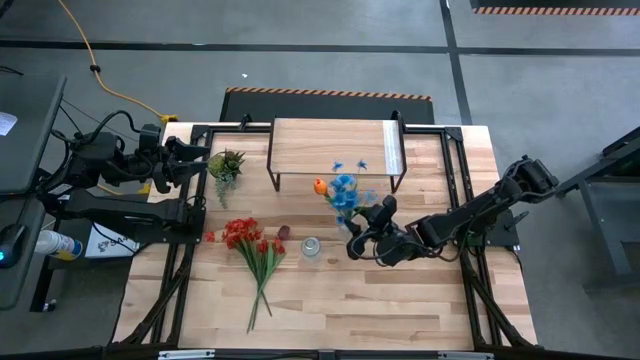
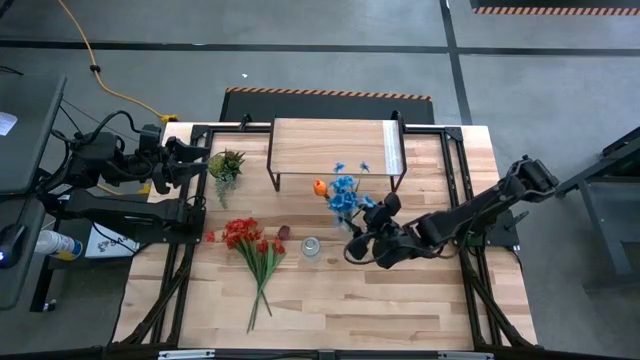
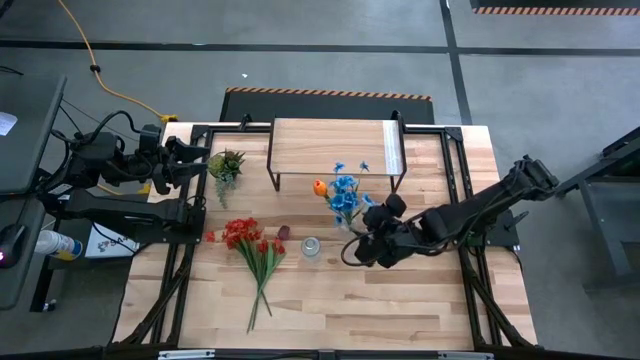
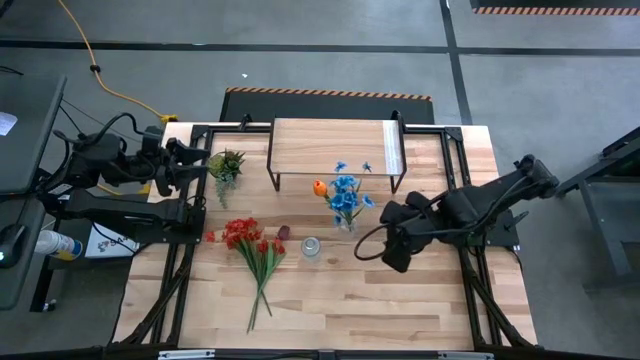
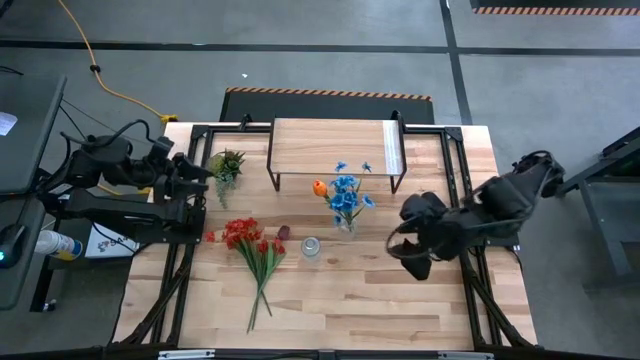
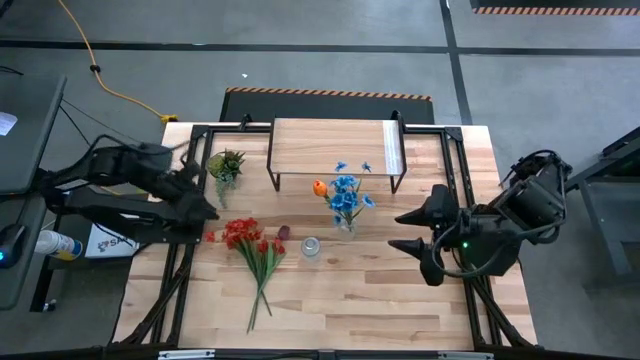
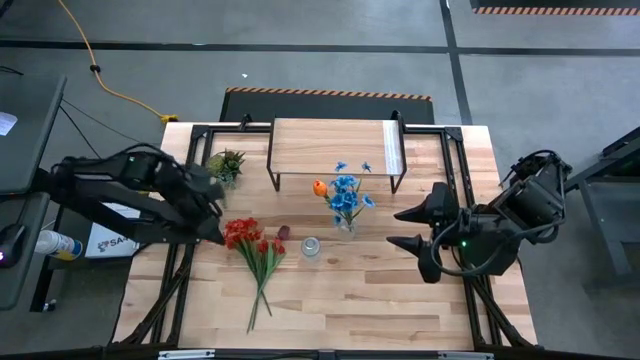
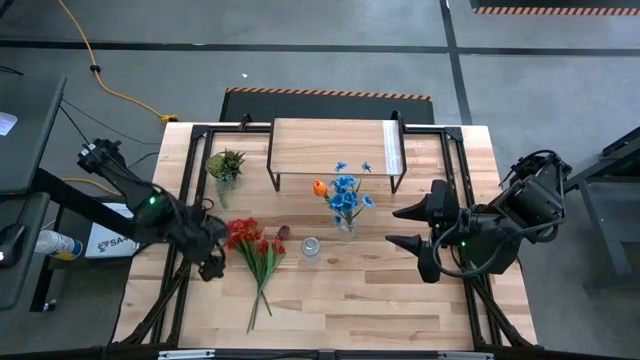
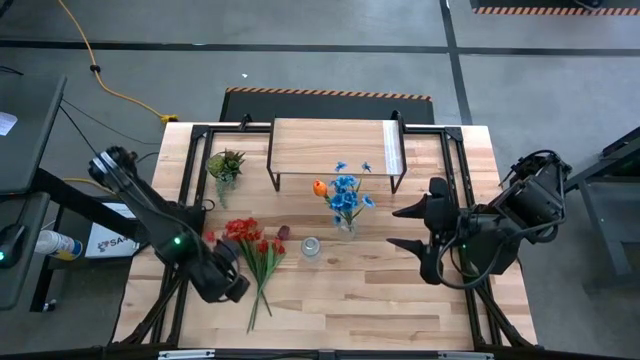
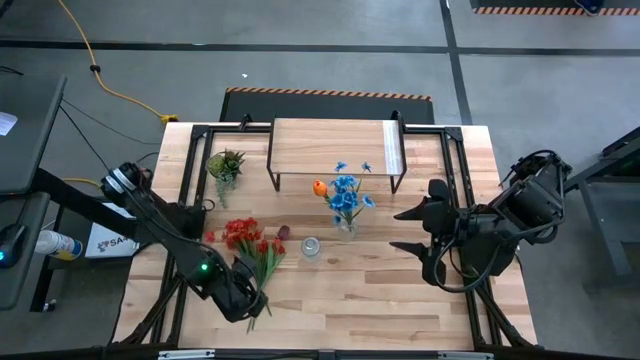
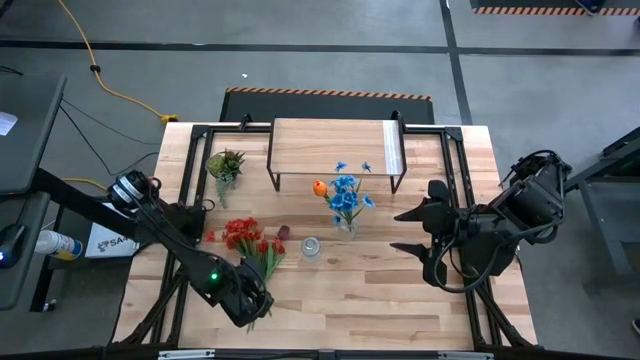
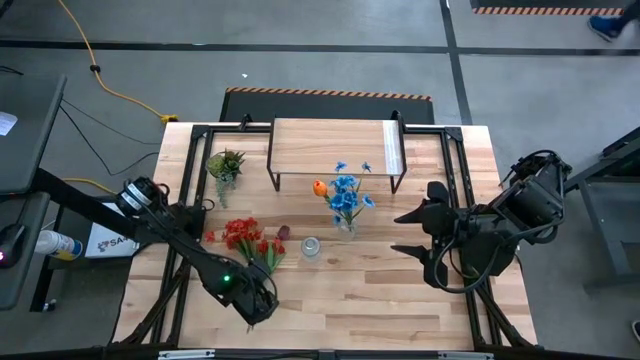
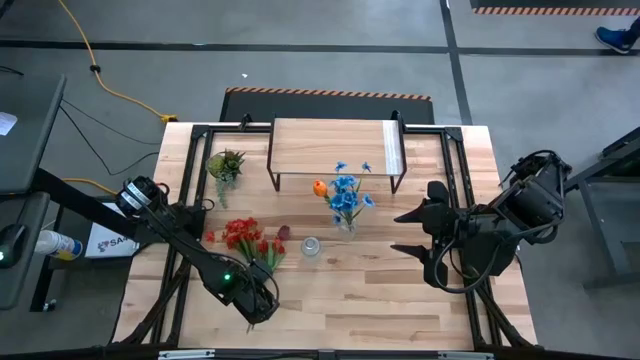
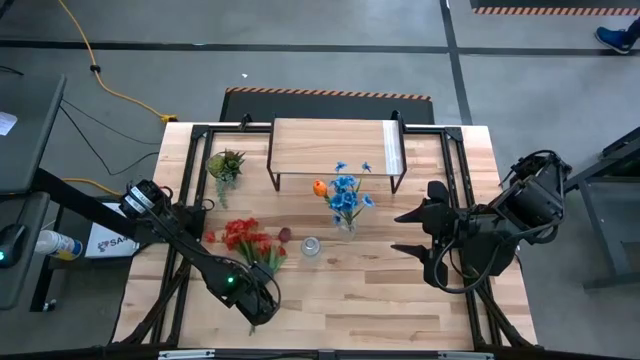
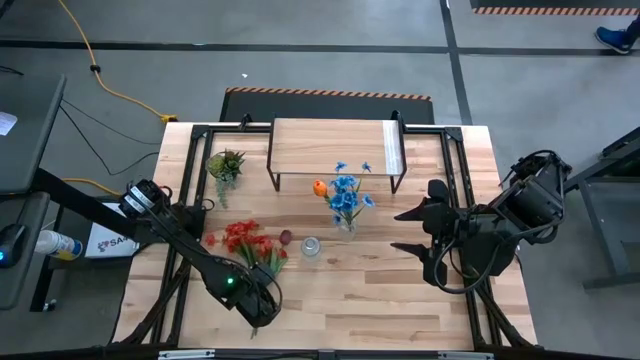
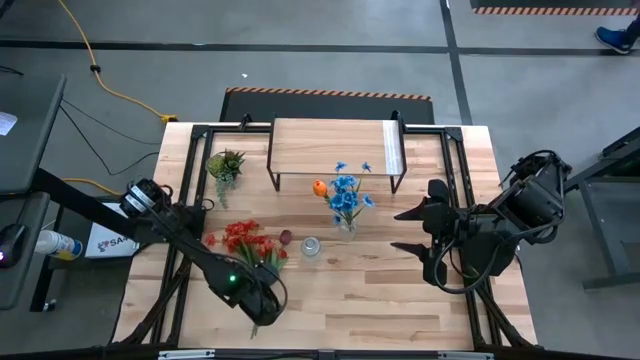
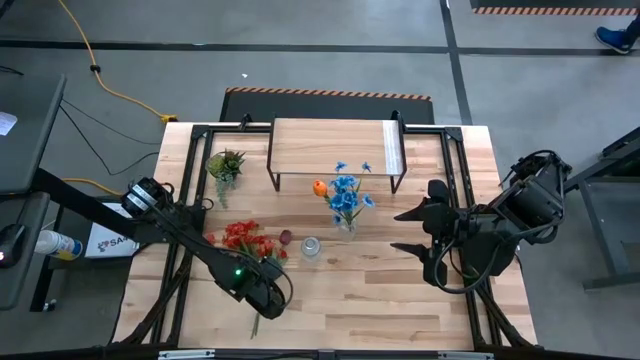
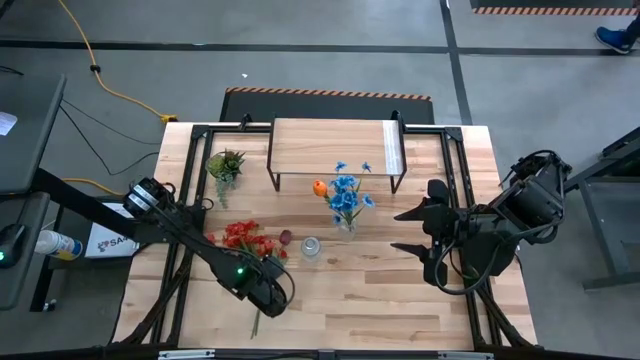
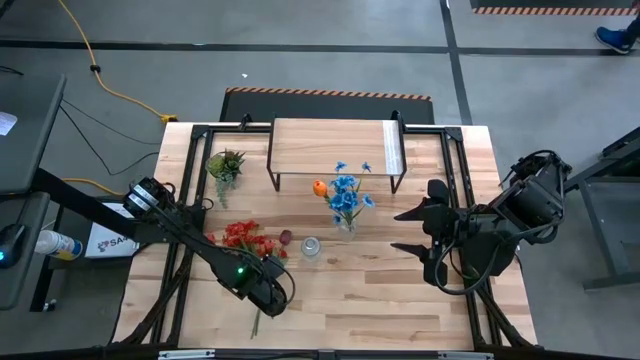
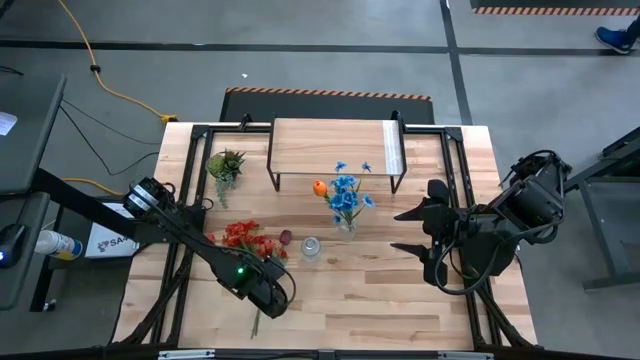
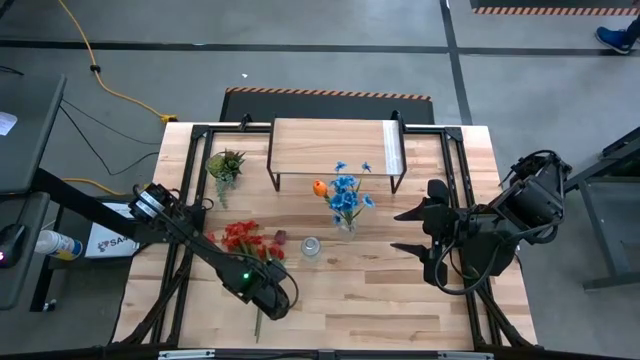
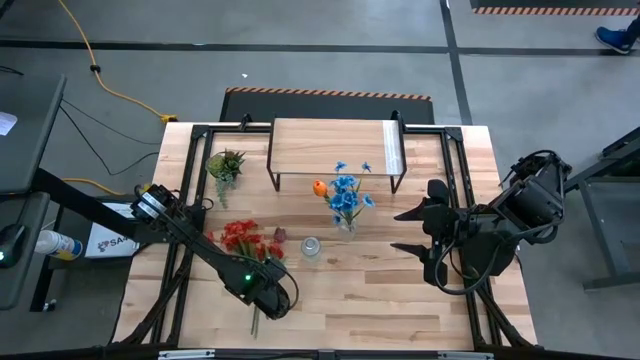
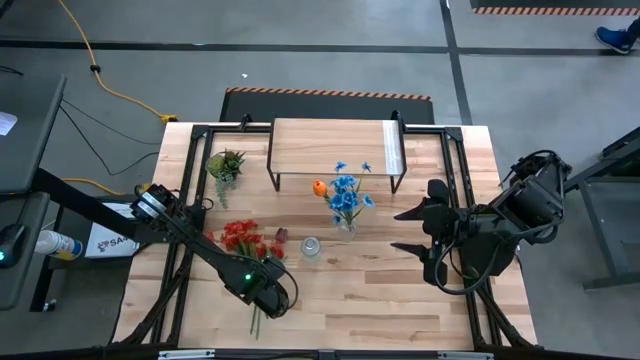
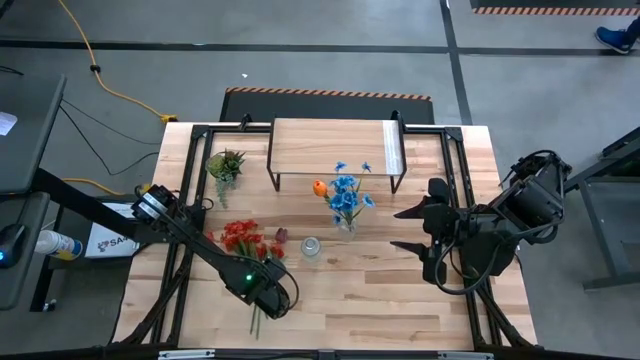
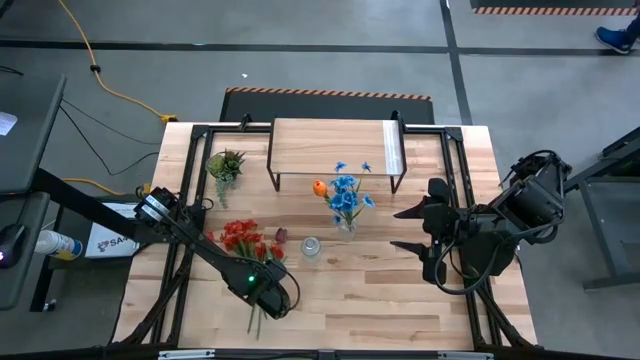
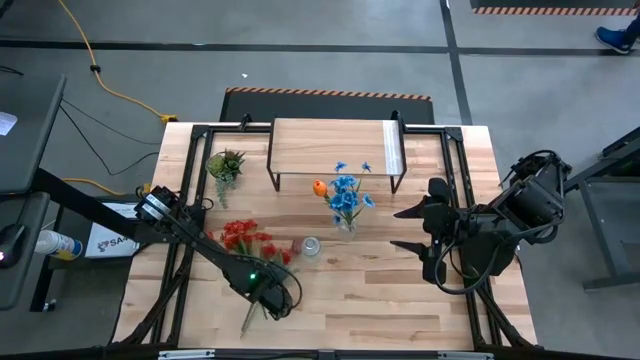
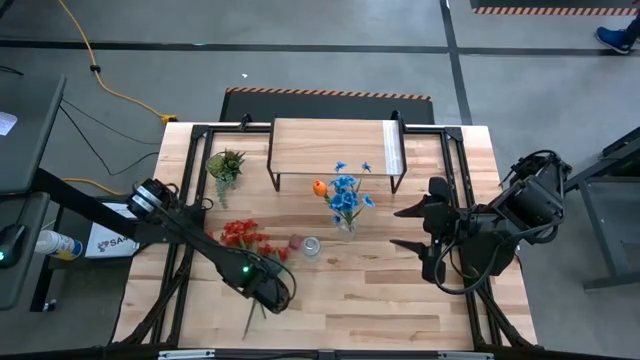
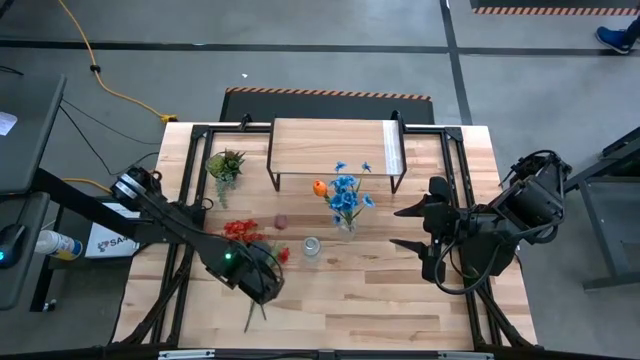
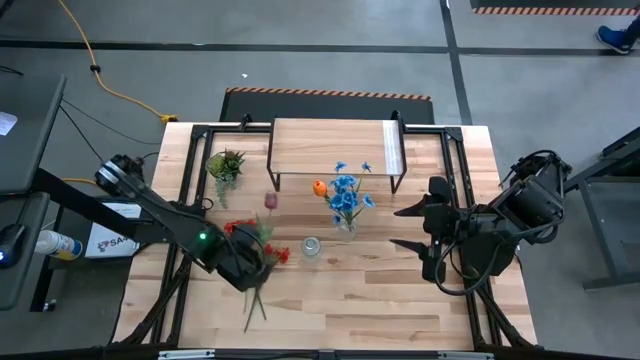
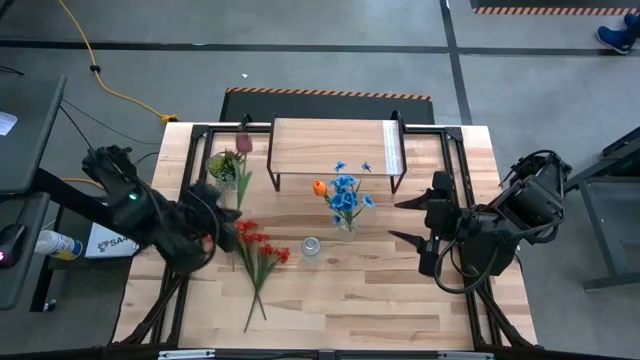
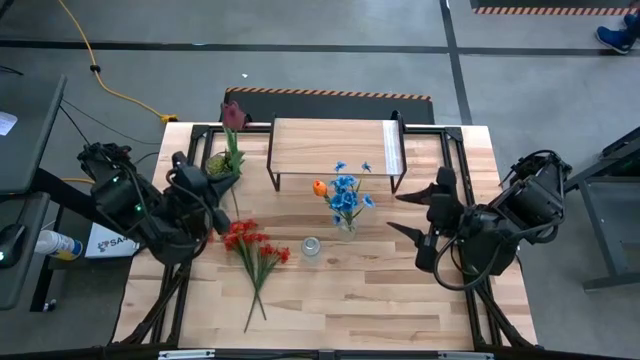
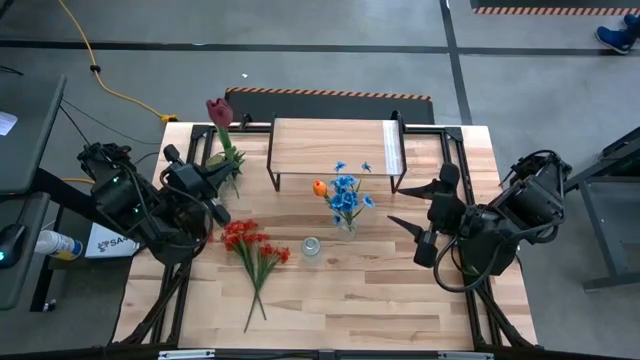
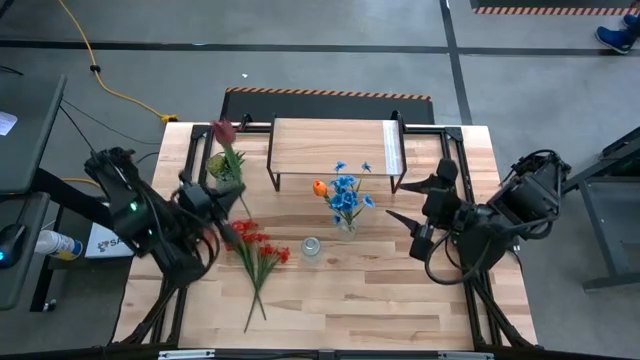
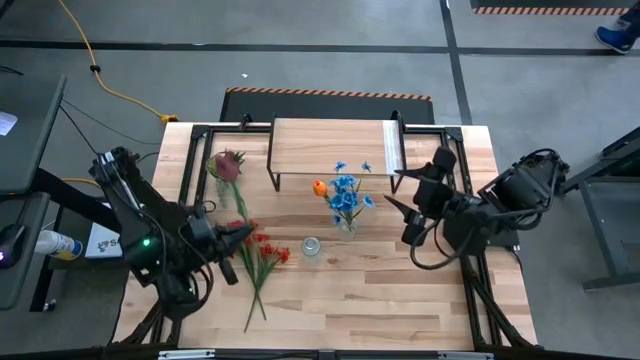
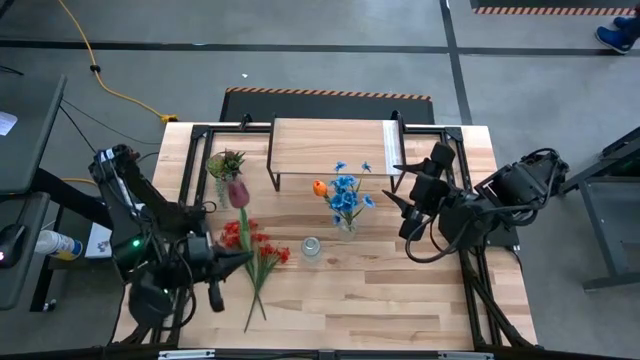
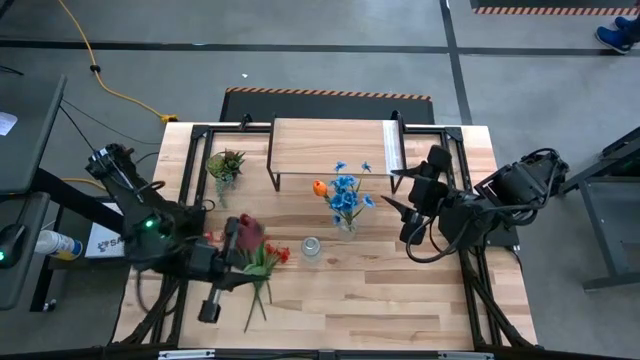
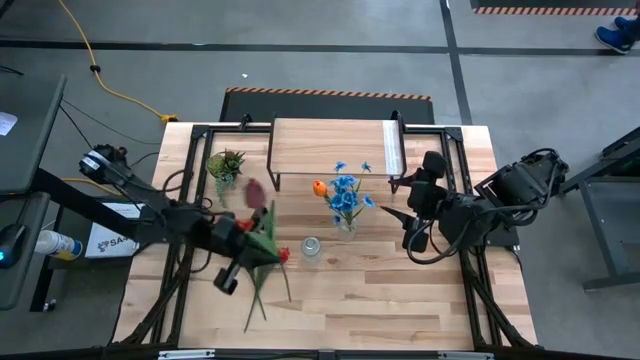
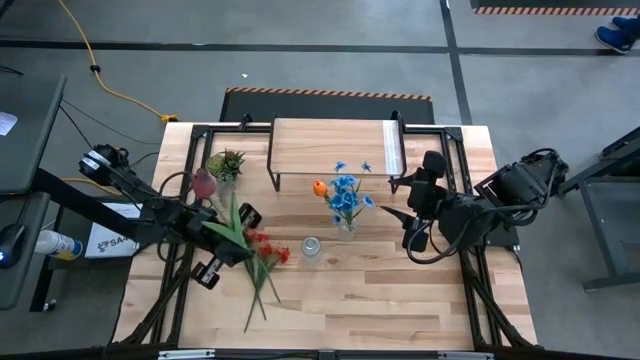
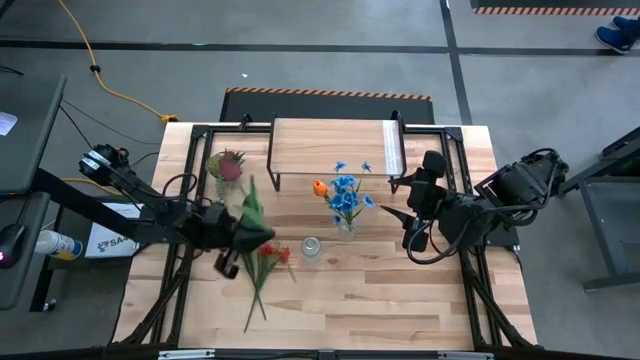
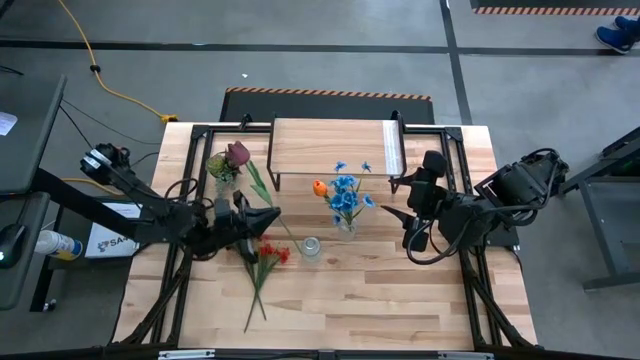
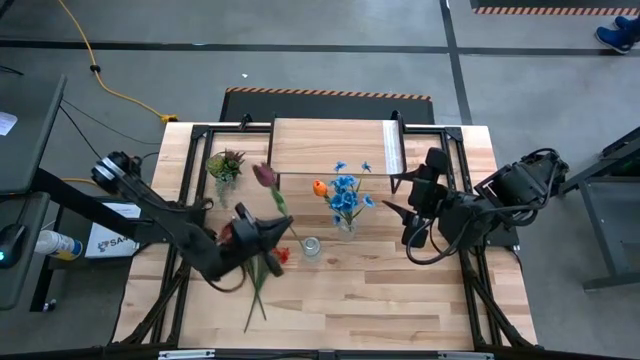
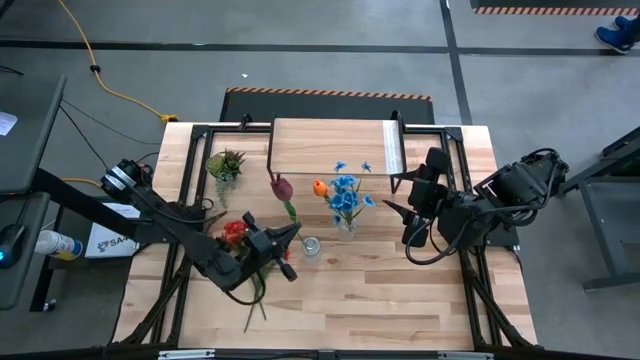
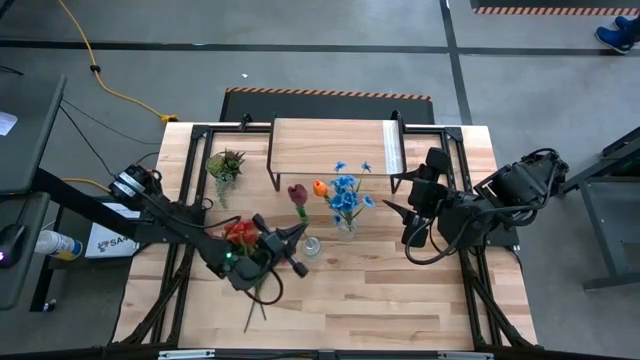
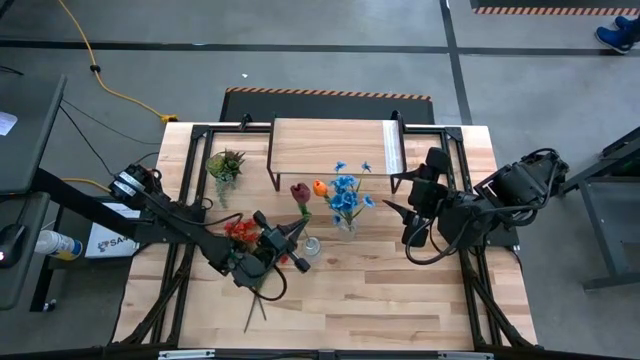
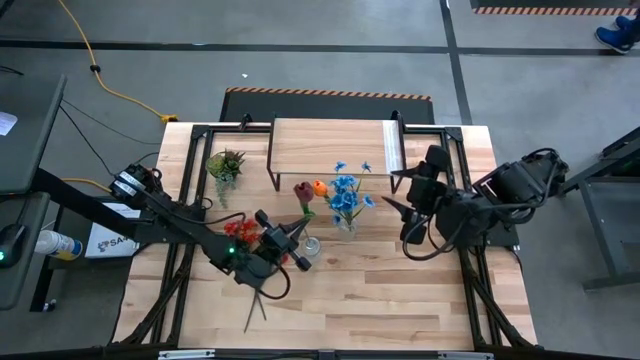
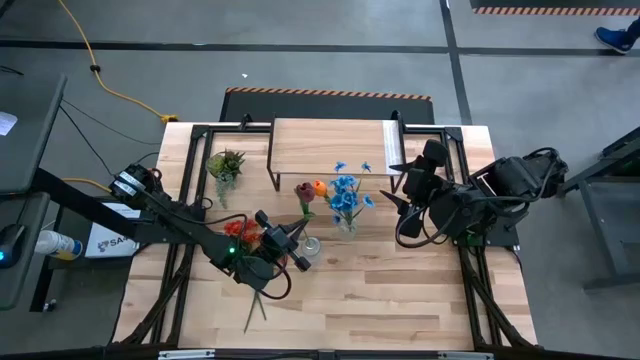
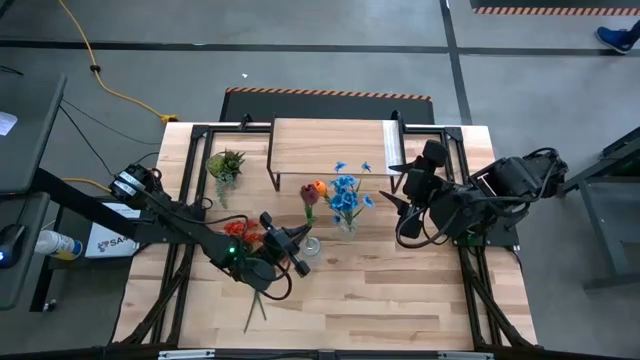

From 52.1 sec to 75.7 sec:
Task: Pick and place flowers into a vace then onto a shelf
Put the red flower into the bottom transparent vase
